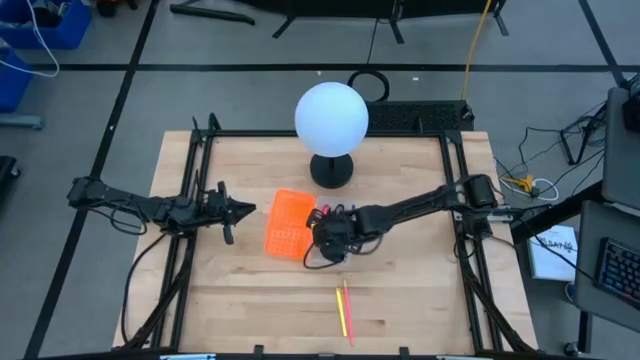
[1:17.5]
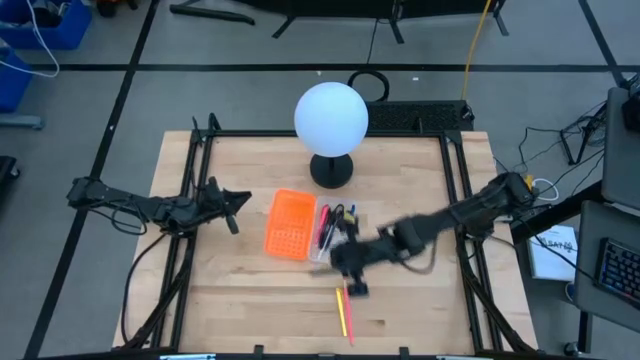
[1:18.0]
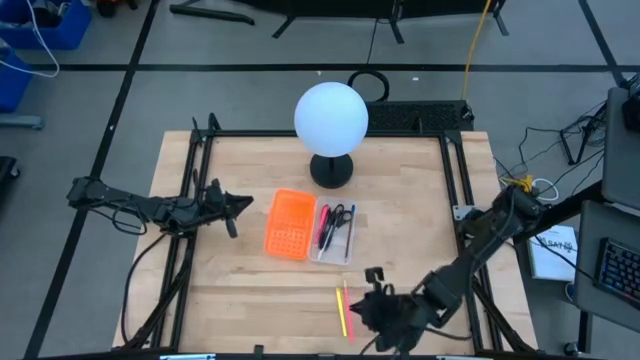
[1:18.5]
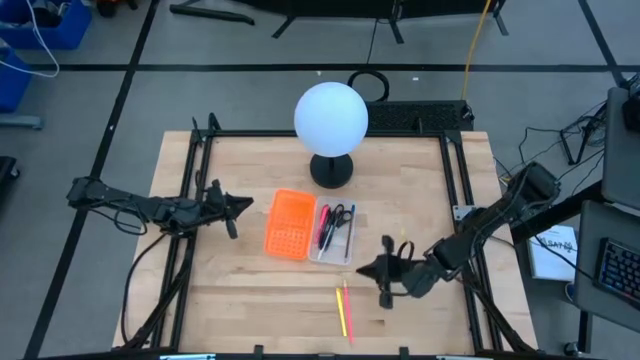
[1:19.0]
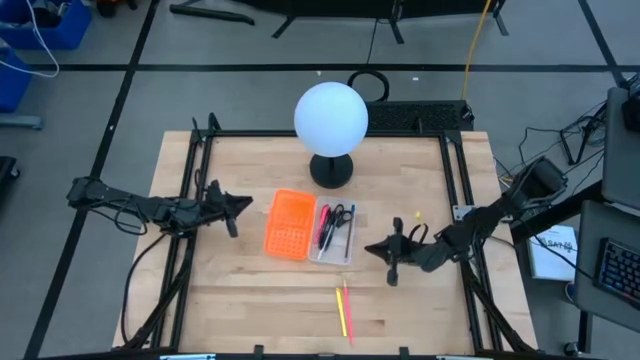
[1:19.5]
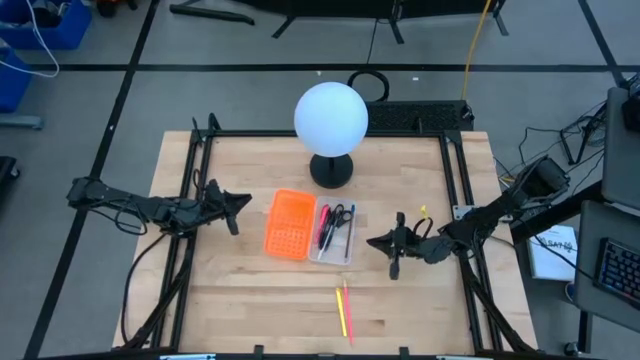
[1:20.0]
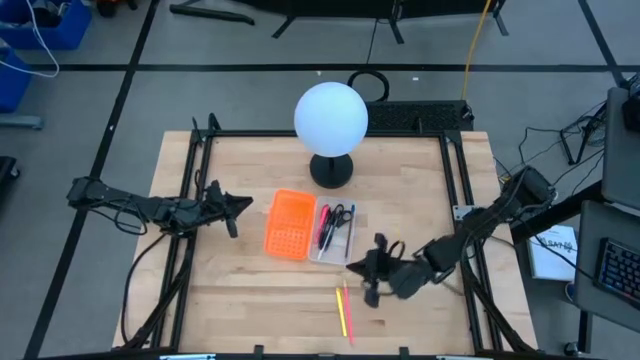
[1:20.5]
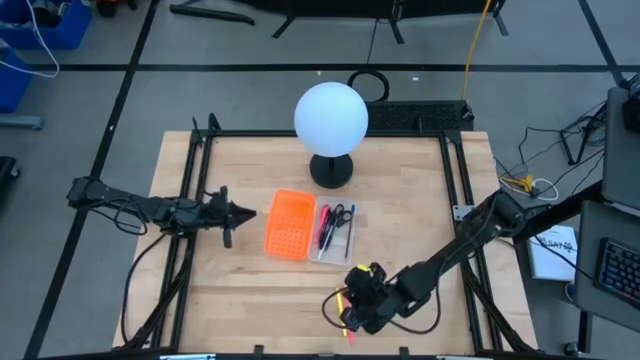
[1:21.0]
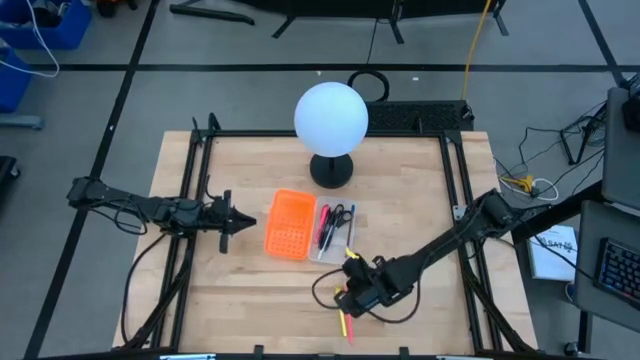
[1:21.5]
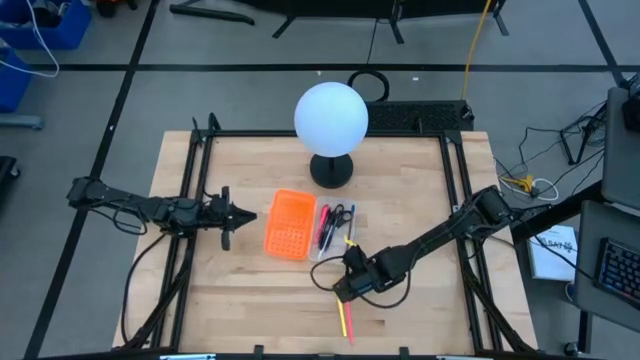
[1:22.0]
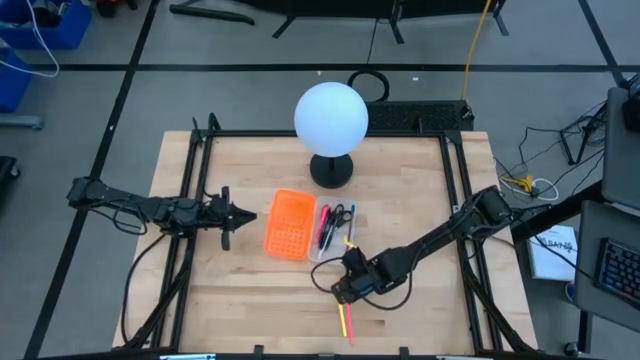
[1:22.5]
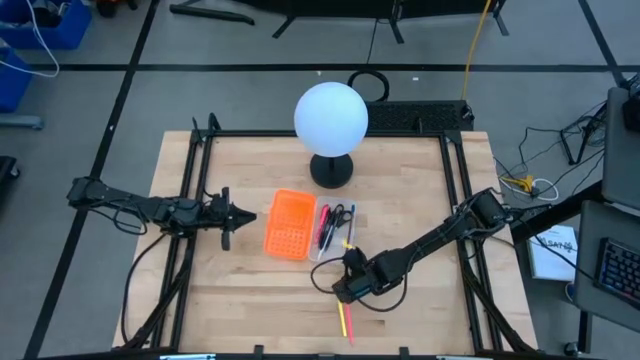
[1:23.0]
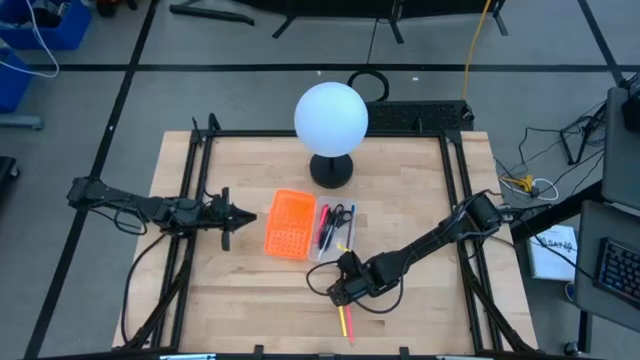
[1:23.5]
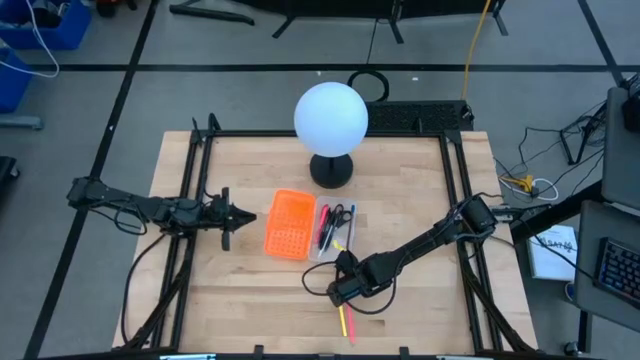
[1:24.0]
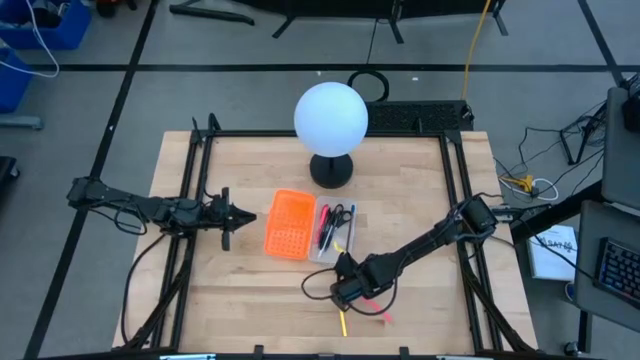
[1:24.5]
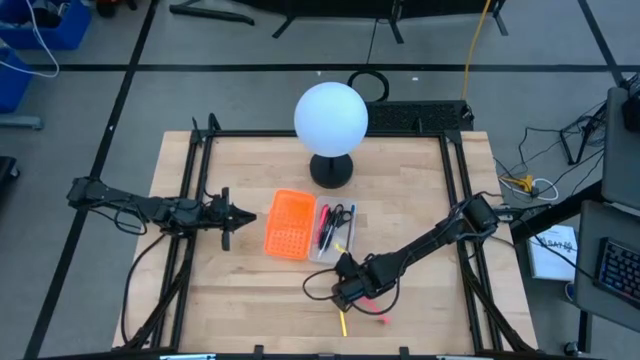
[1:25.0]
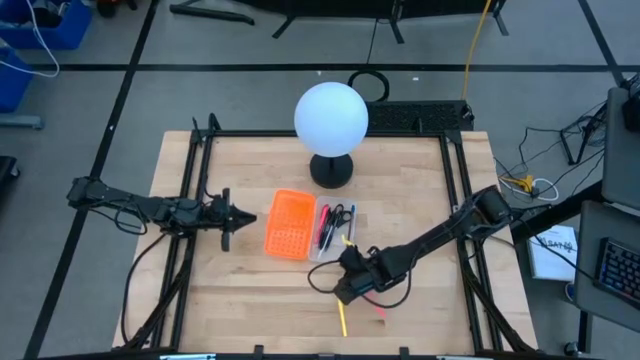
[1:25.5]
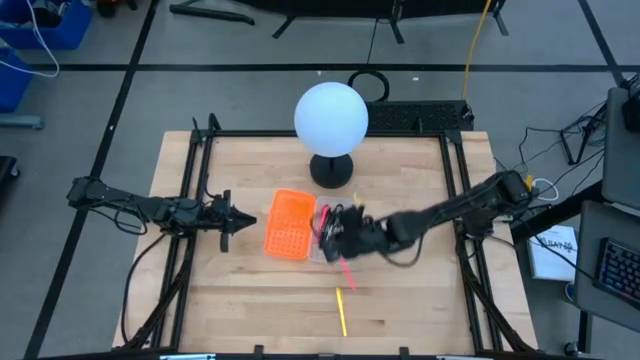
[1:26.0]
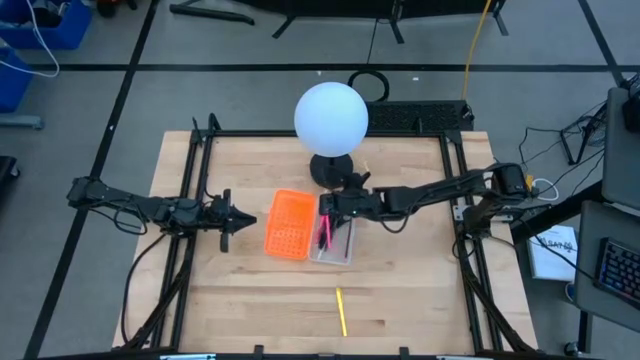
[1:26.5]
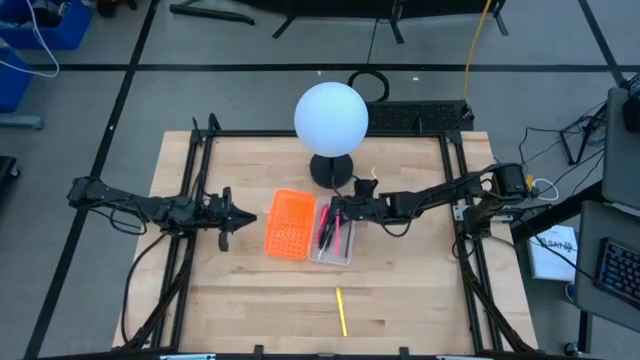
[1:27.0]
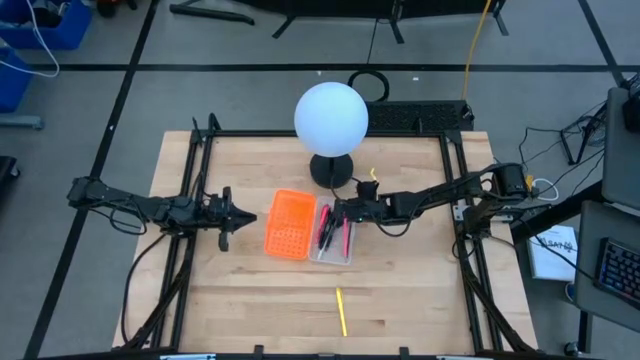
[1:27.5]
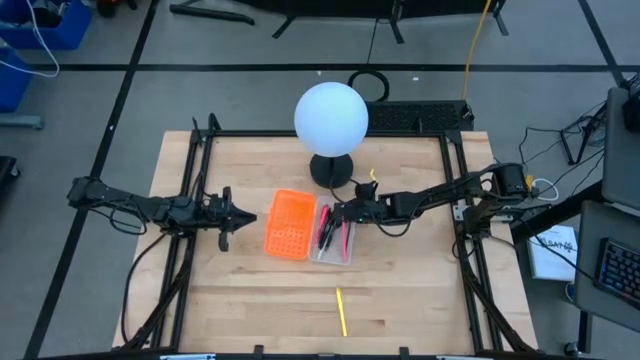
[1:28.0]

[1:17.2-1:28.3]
Task: Pick & place school supplies into a supply box
Put the pink pencil into the supply box

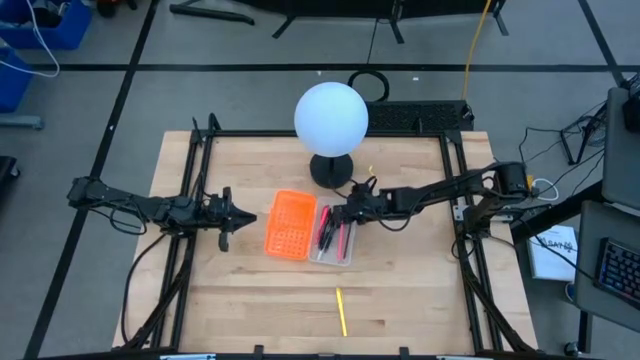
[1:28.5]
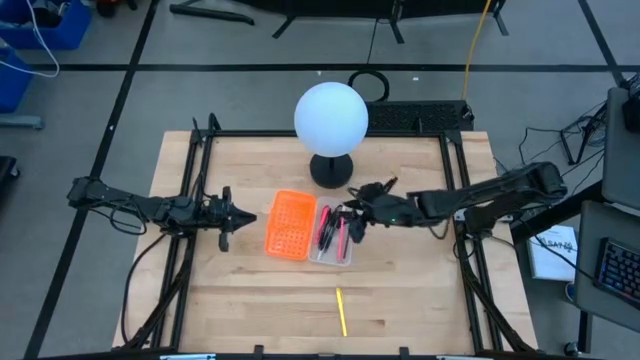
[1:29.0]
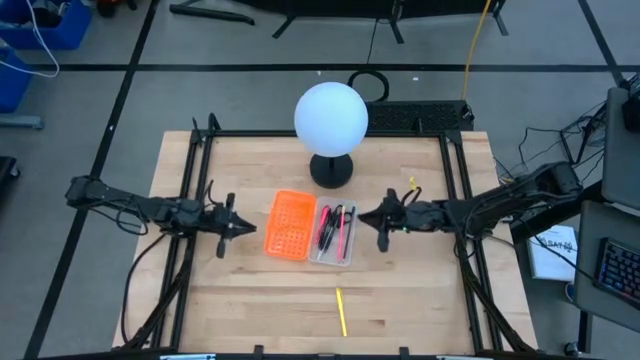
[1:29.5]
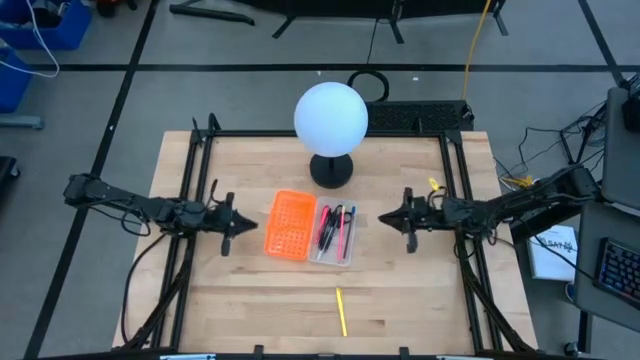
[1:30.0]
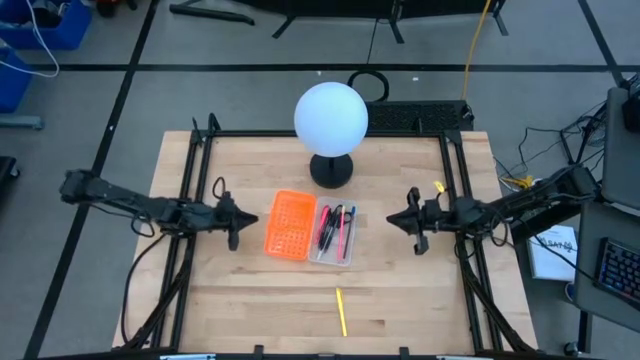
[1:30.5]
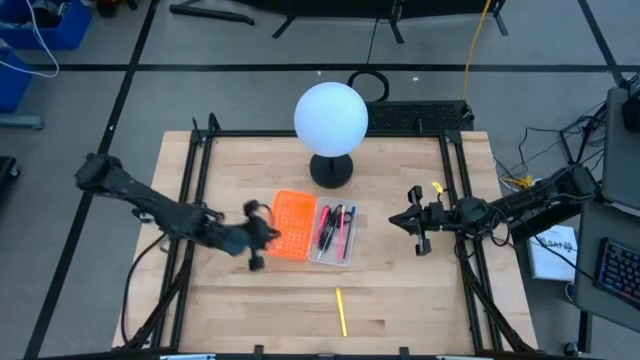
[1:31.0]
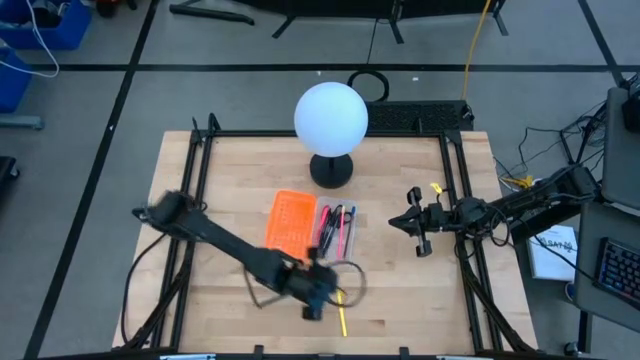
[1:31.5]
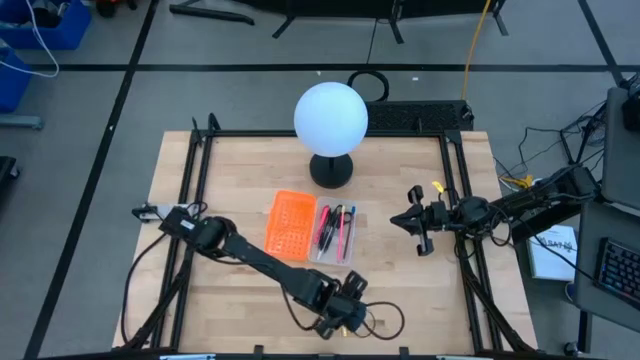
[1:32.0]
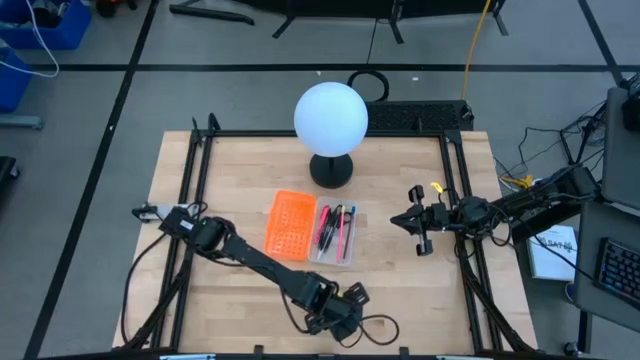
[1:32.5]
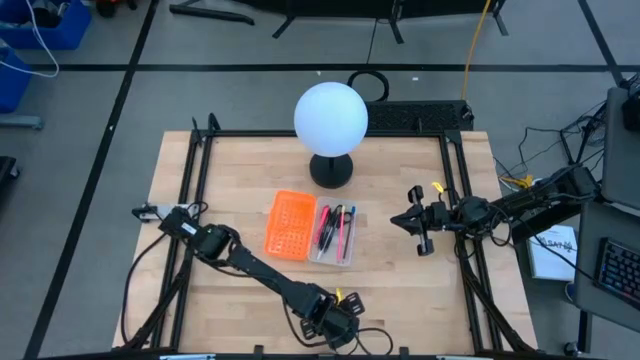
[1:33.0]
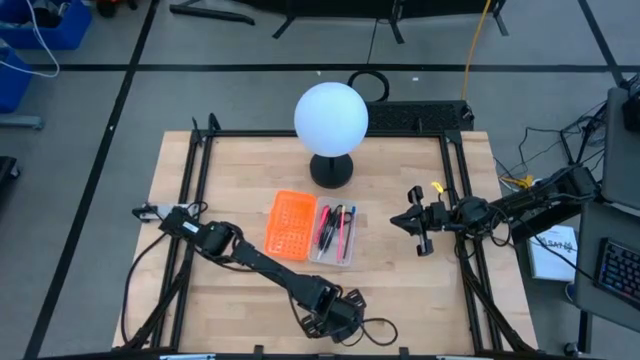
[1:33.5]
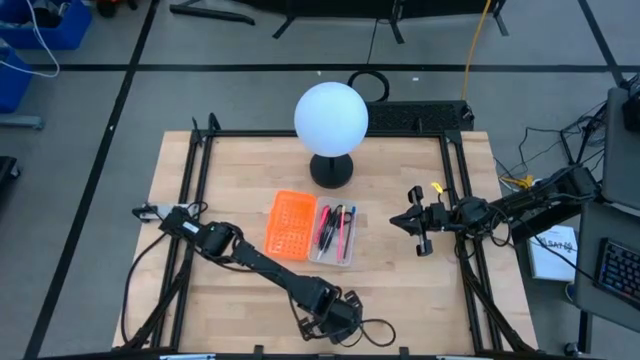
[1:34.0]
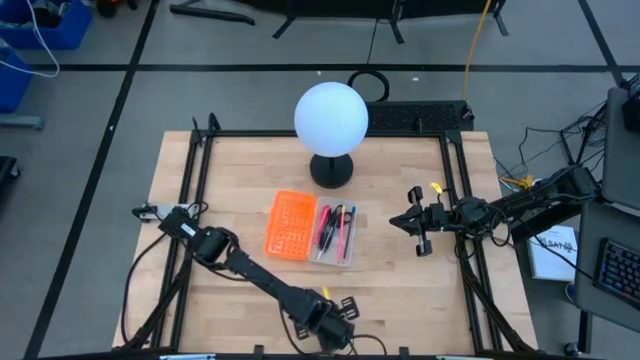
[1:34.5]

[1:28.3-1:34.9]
Put the yellow pen into the supply box

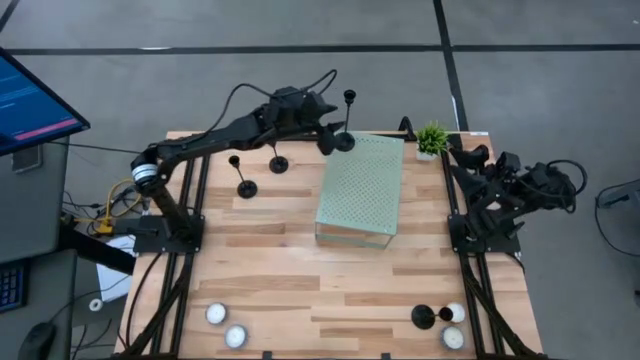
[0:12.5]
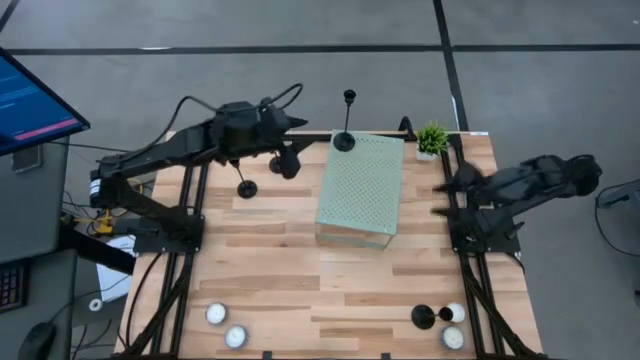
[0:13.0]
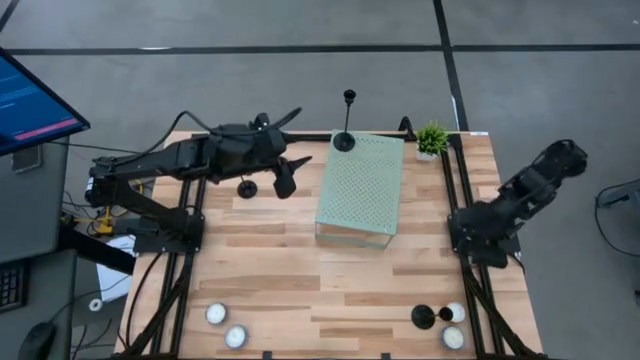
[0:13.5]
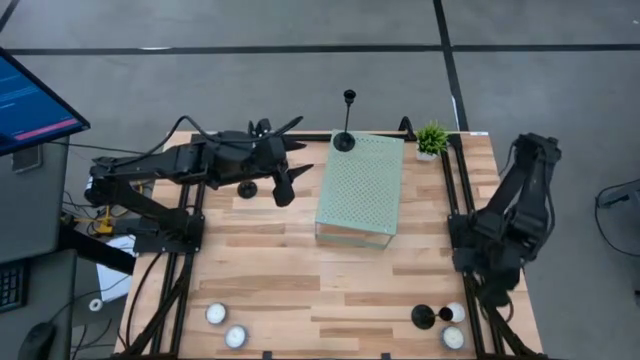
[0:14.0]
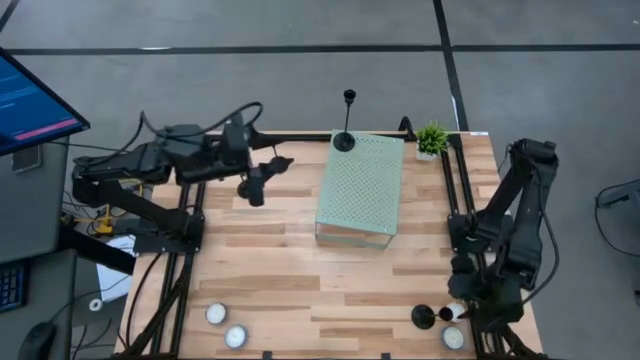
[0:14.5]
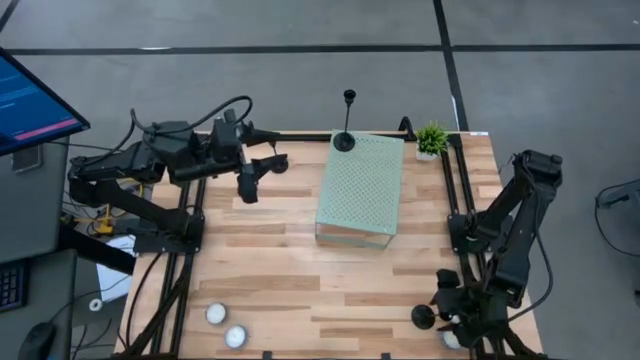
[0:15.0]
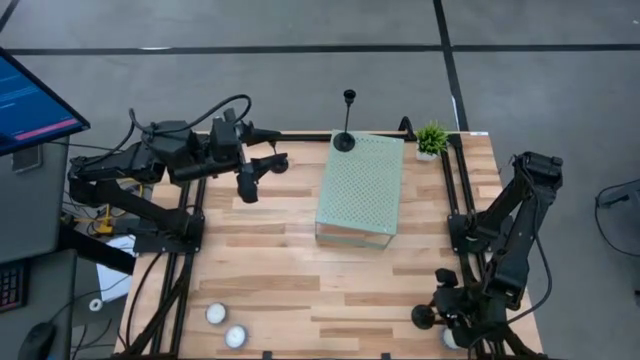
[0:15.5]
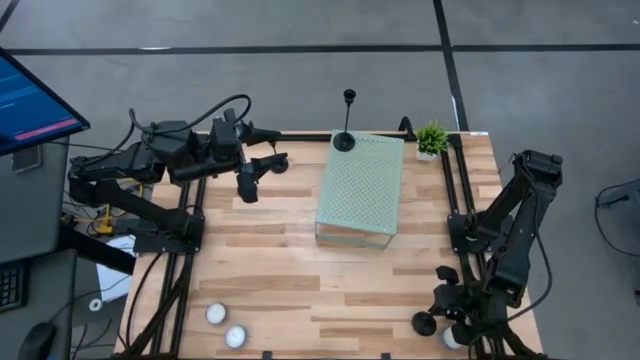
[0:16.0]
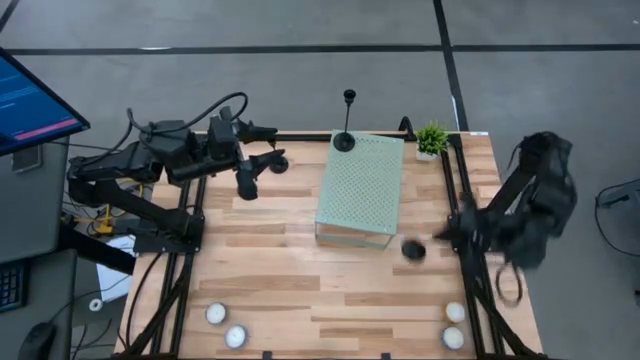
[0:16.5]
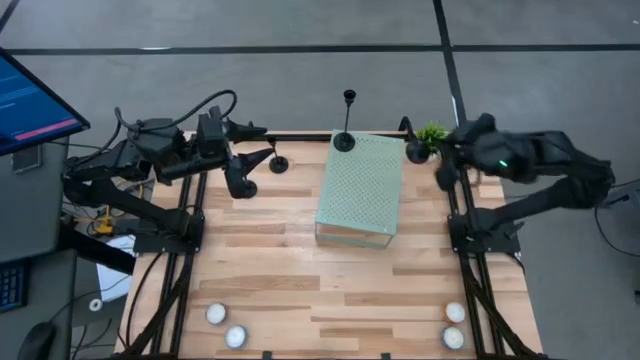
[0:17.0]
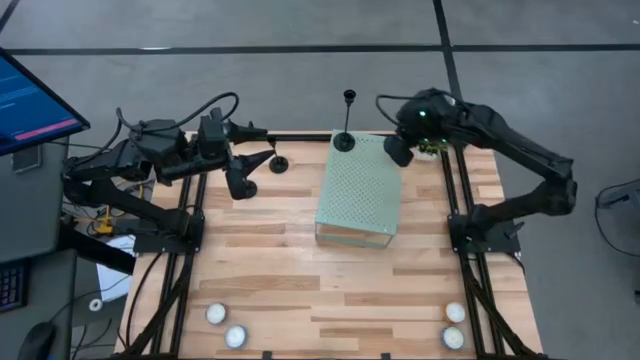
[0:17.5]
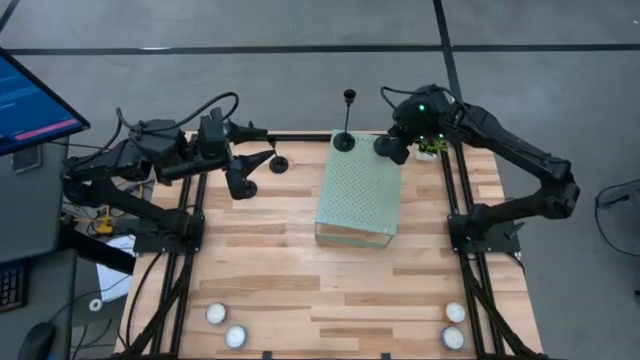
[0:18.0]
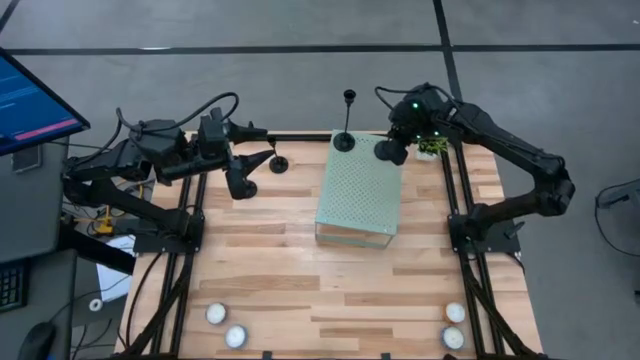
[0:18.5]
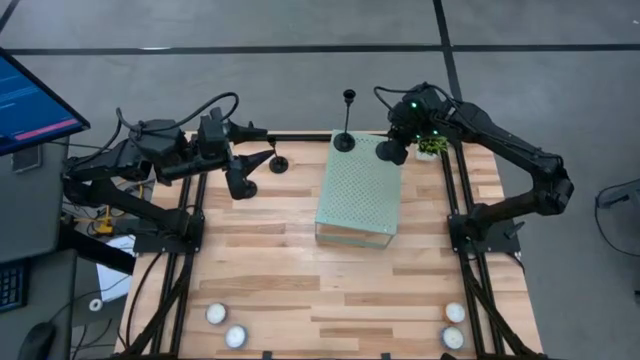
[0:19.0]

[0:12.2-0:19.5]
Task: Pick & Place candle stick holders
Put the black candle holder on the shelf and align it with the other black candle holder
